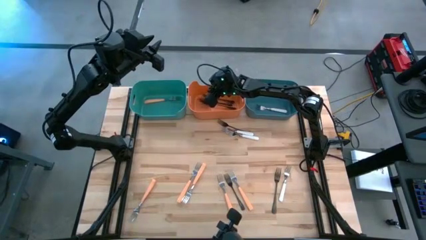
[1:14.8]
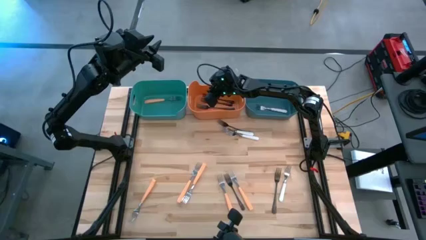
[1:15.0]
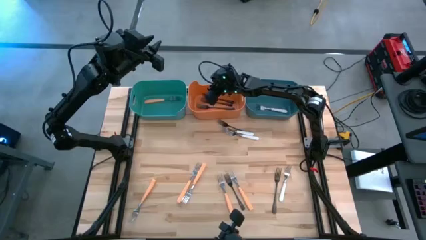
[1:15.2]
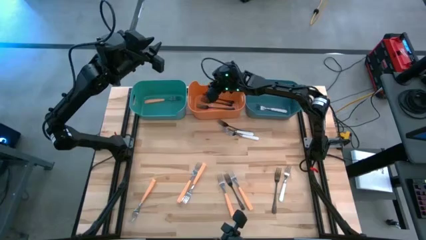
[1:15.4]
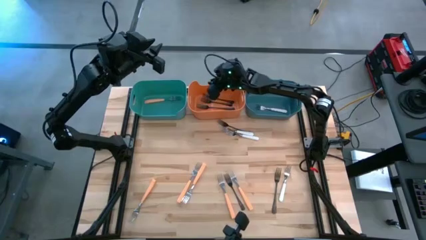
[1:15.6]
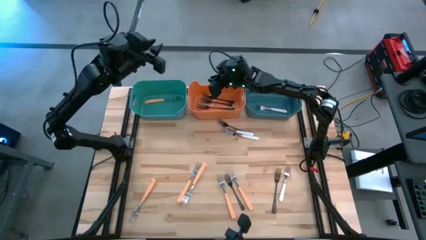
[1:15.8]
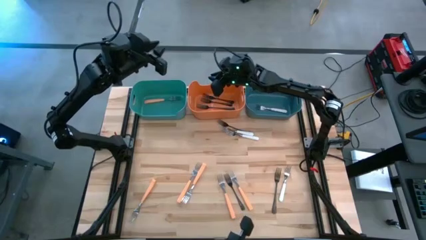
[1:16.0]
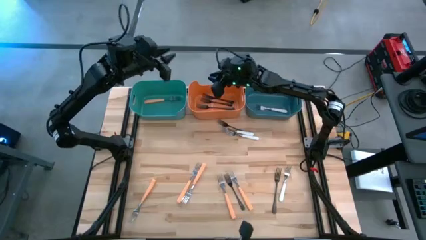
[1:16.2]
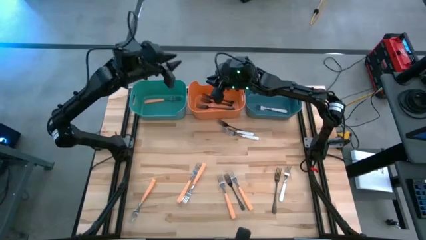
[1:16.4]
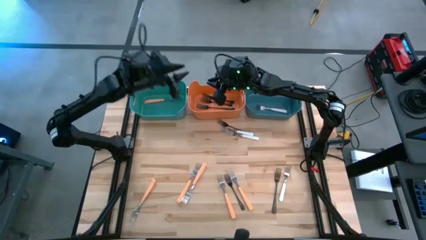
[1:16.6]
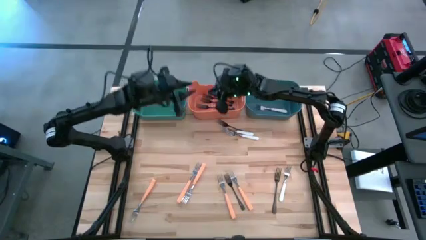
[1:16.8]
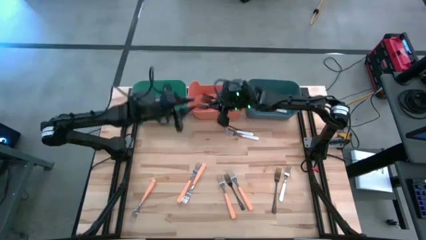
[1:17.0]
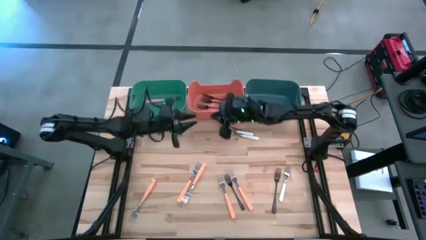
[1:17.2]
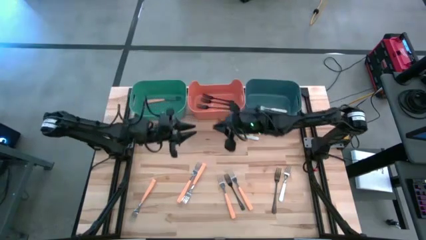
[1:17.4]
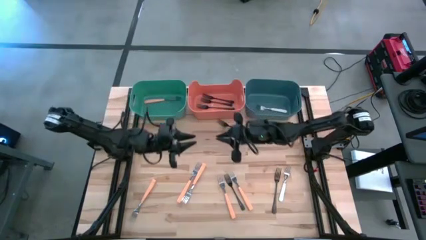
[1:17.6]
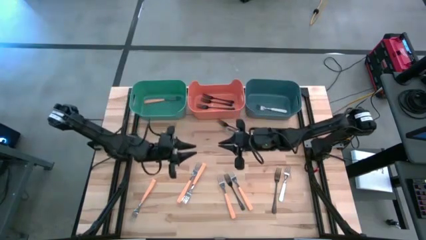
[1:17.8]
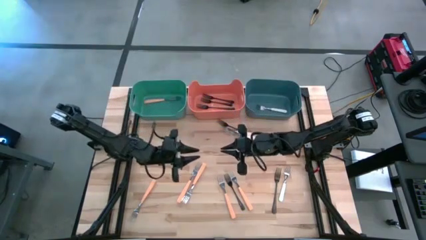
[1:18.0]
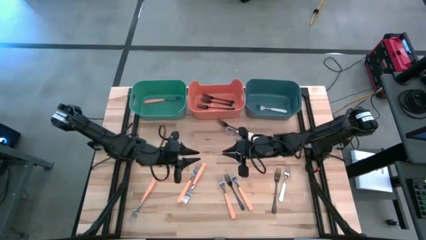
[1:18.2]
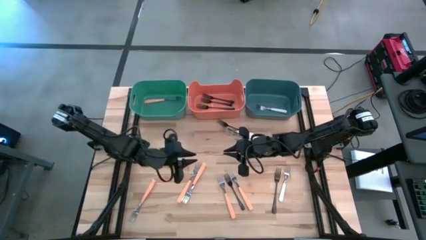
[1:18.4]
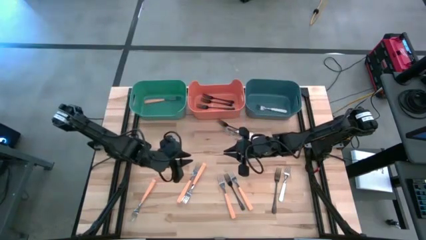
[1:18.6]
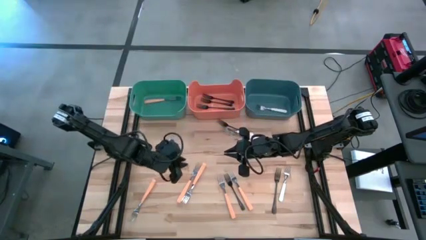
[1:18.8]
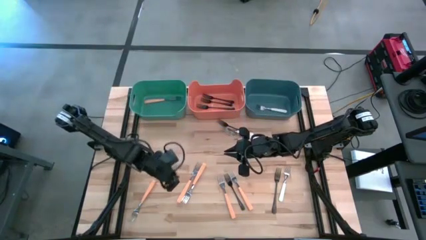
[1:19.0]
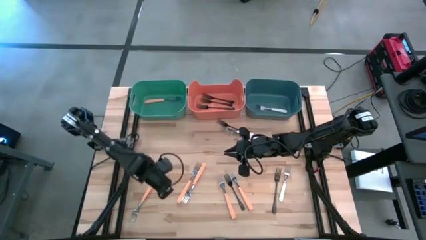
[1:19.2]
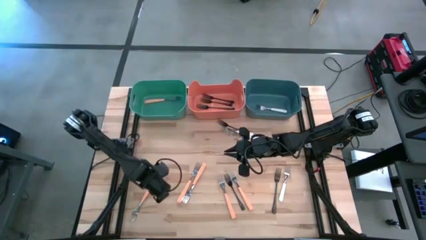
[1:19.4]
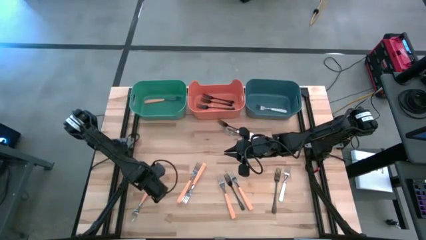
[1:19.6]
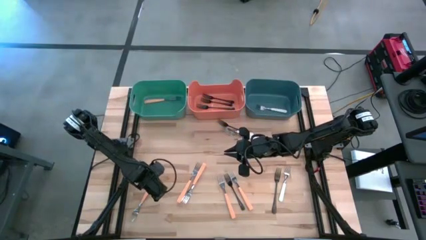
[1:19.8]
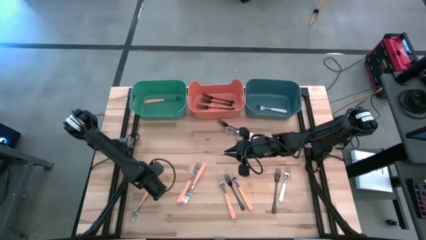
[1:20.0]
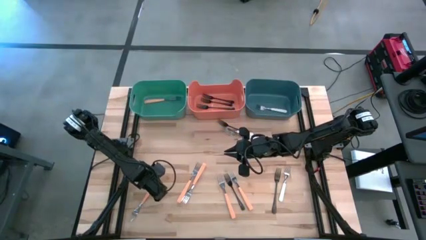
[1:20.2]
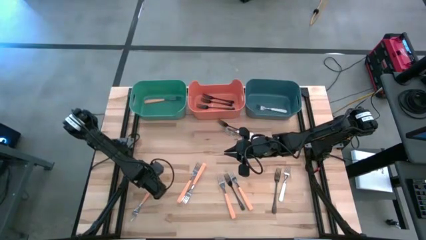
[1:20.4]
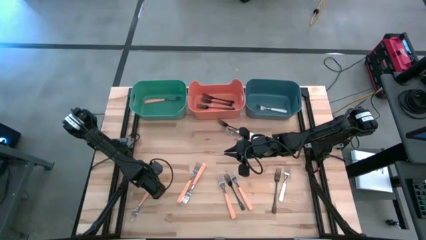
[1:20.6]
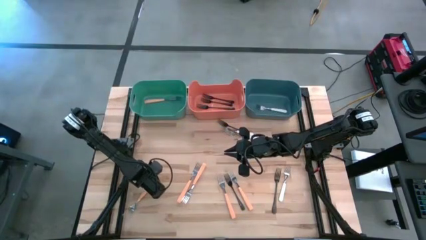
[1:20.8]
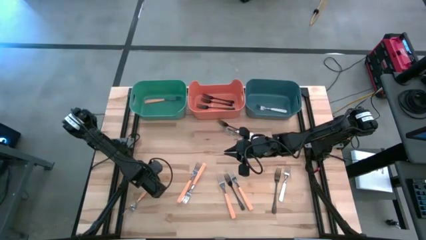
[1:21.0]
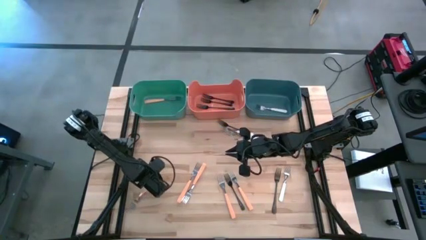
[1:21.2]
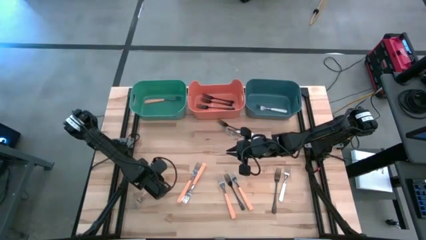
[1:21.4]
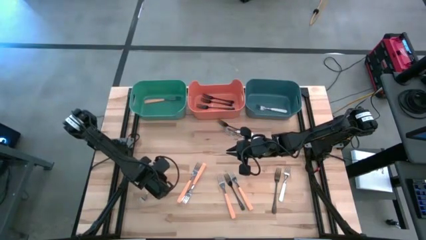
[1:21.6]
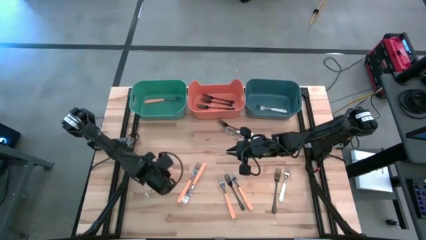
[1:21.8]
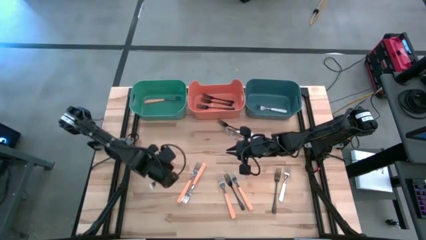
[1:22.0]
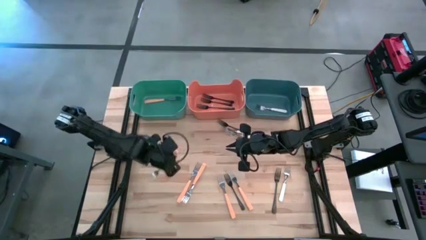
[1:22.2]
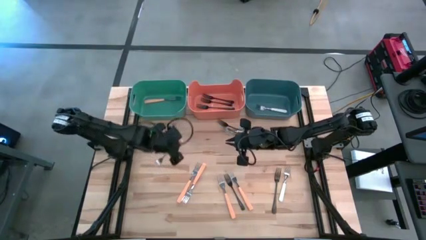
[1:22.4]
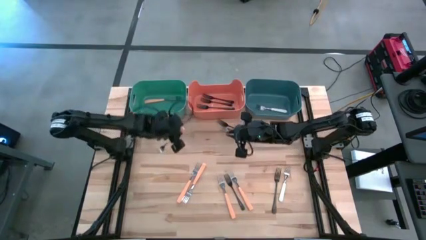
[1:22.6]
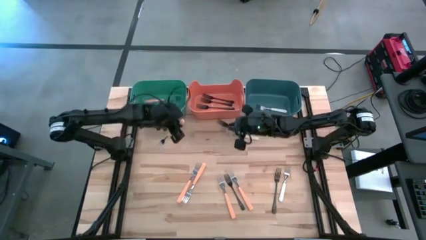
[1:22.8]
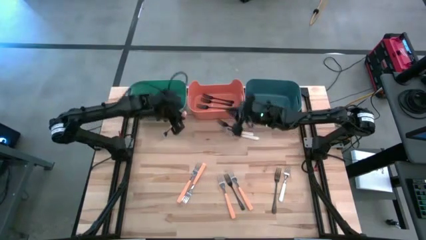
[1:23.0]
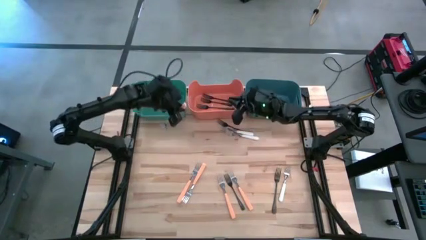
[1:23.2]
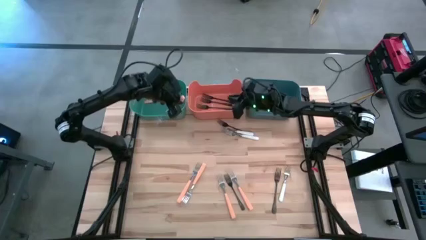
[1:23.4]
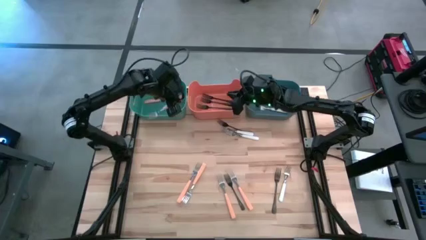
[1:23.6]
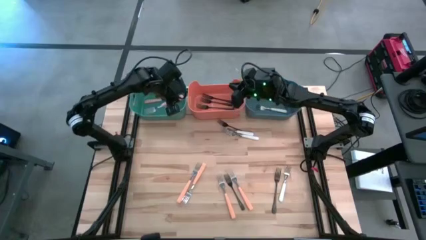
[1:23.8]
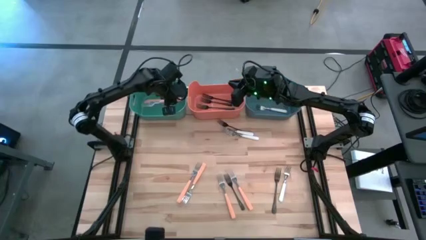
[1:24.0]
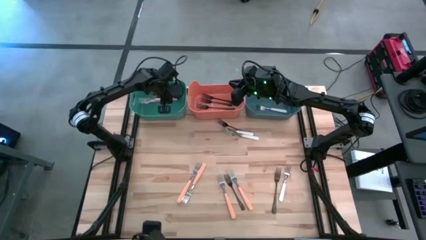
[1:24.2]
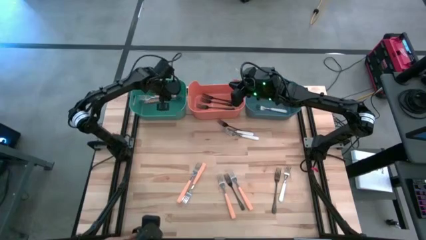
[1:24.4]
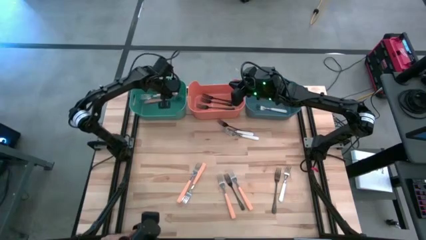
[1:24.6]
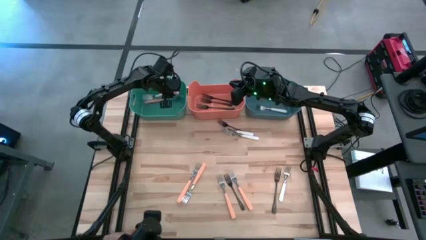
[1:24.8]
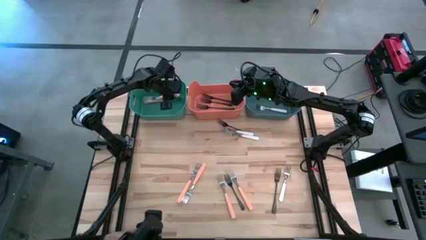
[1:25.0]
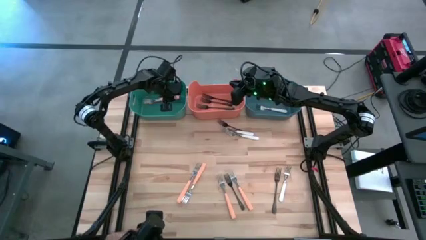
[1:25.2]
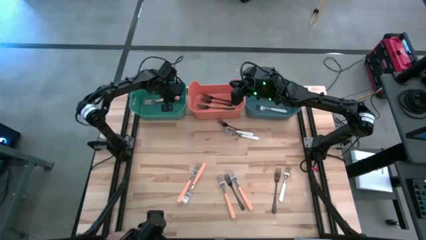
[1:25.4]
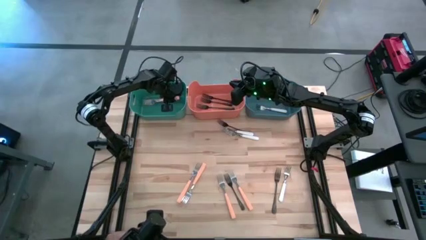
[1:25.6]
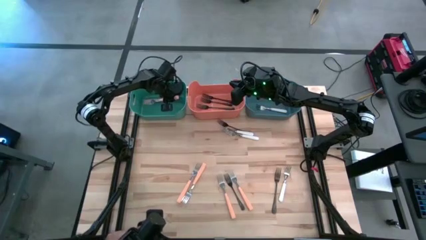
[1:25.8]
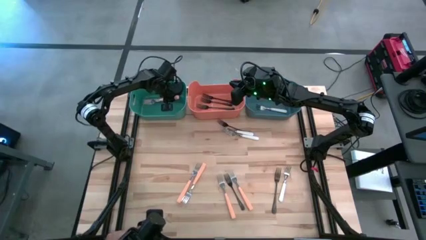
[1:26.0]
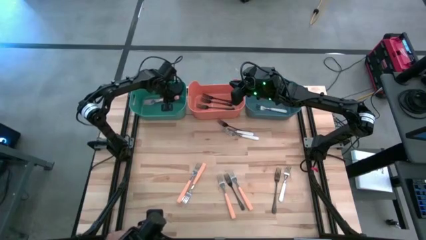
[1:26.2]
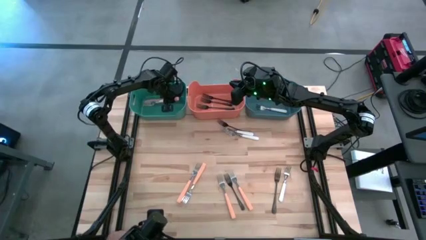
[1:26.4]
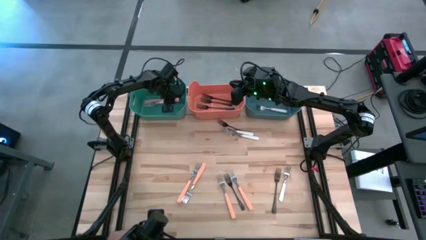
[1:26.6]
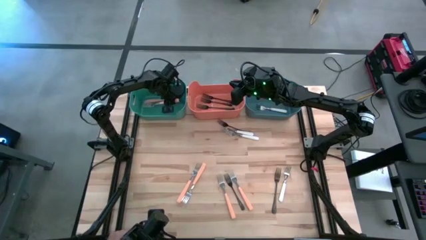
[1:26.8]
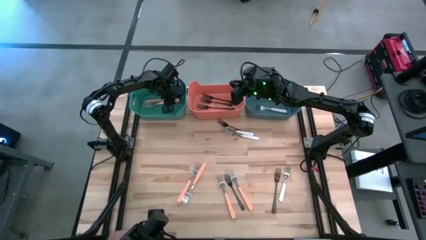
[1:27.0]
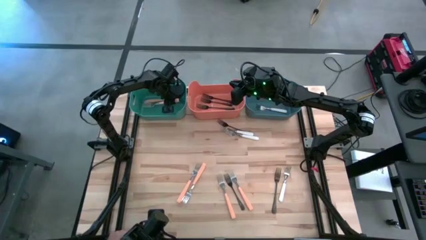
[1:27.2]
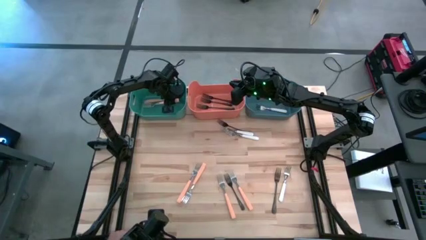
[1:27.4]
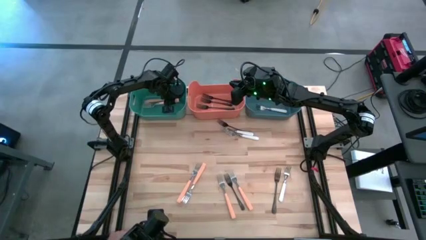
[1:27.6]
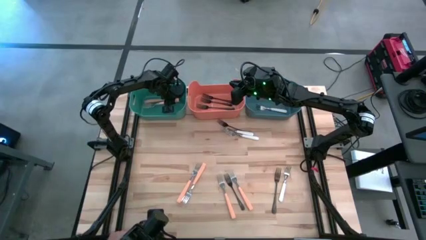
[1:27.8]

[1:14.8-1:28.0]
Task: Sort silverware by color (type)
Put the orange fork into the green bin

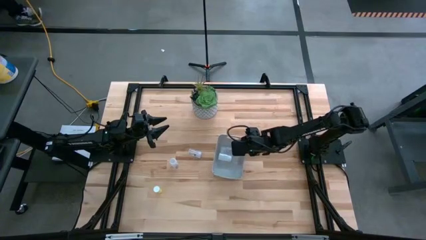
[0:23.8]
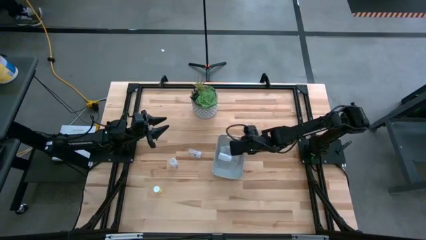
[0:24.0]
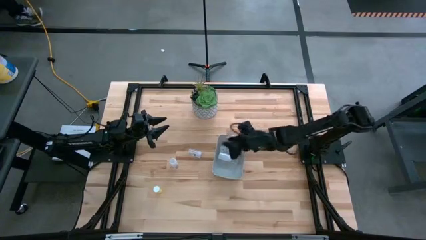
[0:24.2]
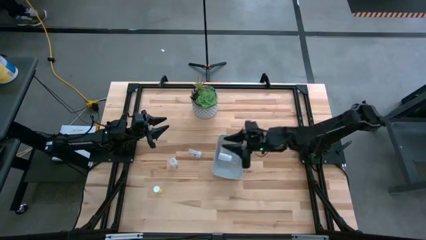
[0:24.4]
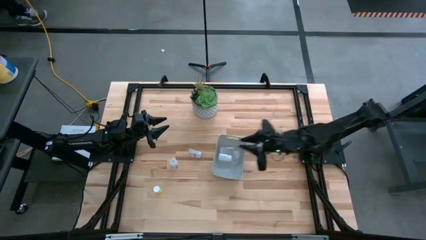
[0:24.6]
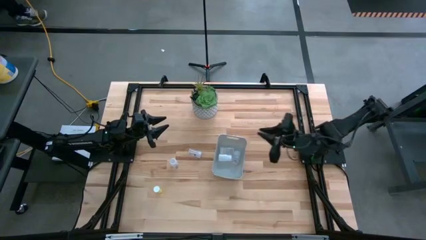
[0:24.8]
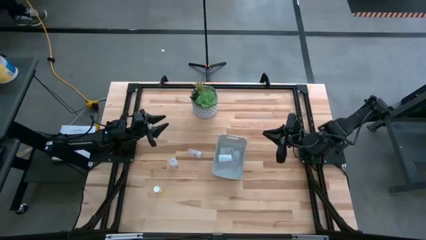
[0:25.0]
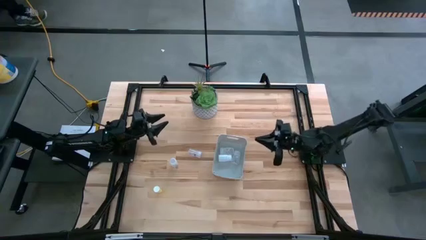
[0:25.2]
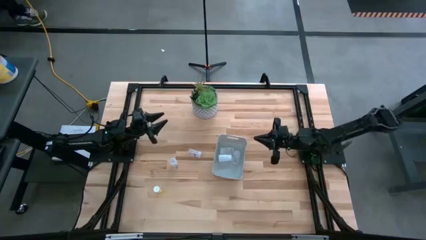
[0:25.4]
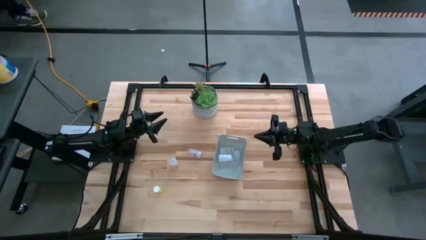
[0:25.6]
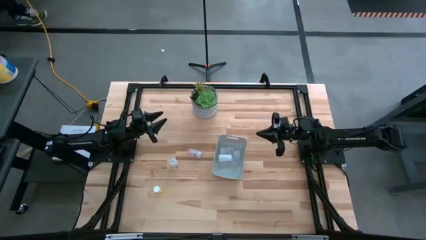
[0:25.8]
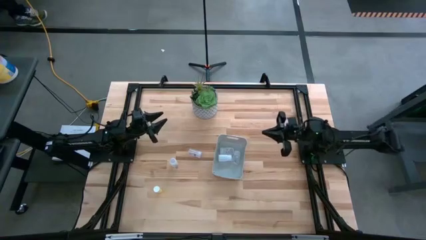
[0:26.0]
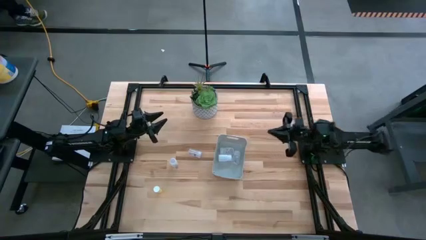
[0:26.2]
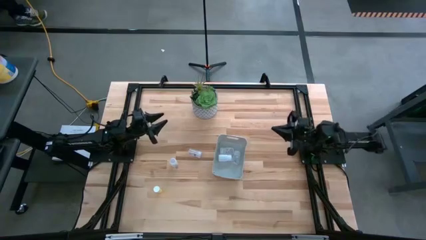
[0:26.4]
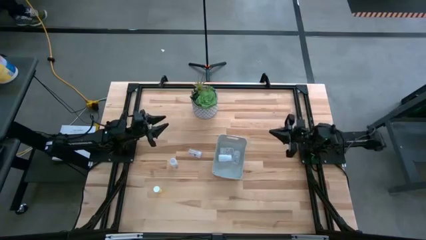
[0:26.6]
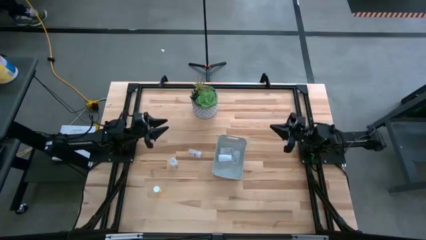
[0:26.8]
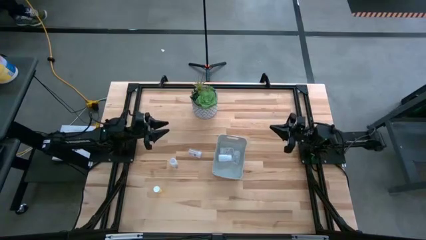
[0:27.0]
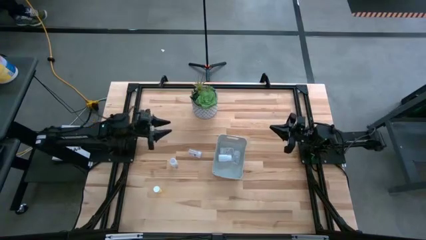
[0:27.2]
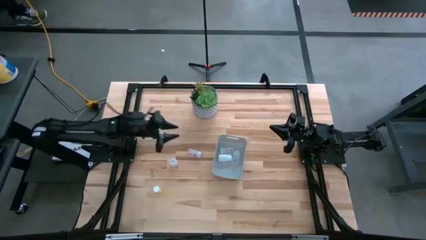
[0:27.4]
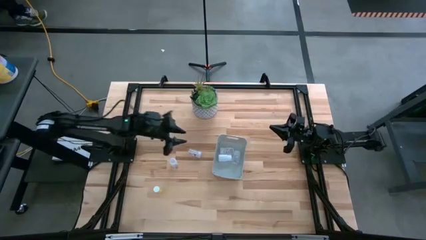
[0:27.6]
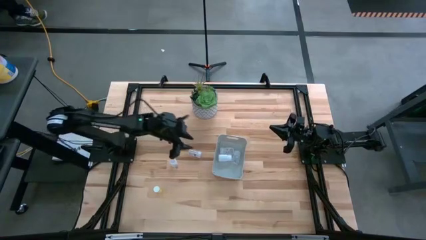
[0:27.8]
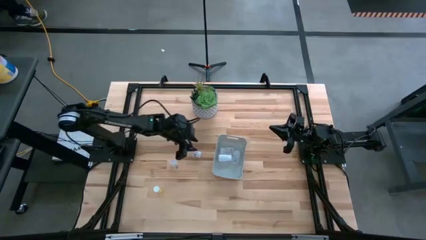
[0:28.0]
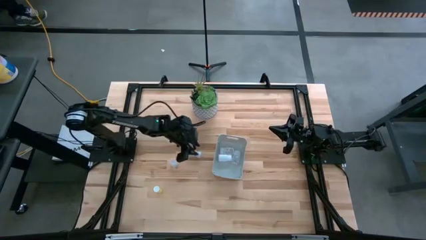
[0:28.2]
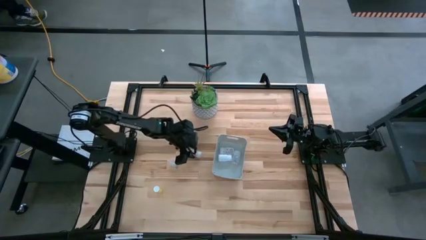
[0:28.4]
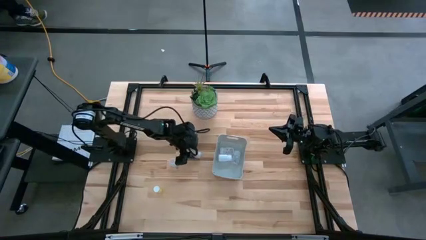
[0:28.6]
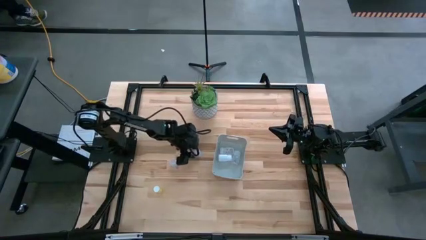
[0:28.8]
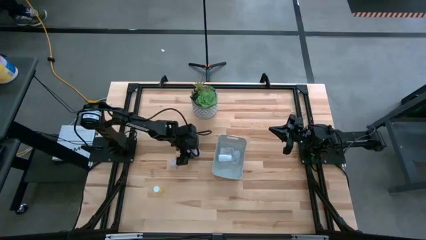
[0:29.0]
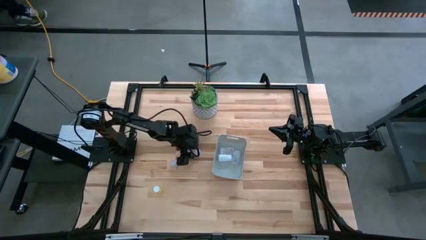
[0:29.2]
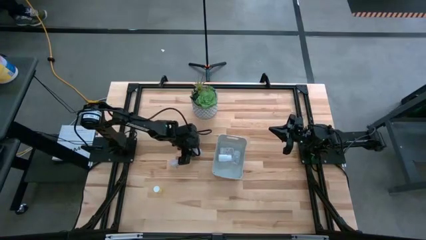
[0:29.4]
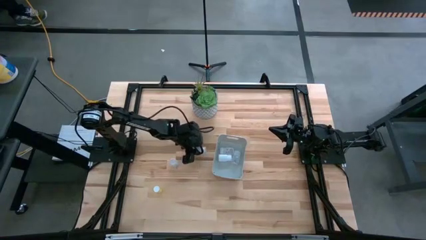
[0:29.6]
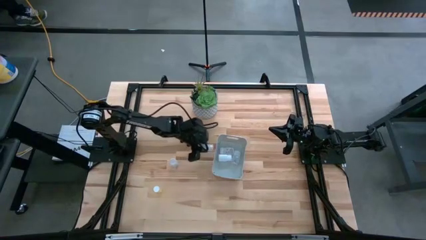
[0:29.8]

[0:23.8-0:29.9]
Task: Pick and place pill bottles into a basket
Put the top transparent medicine bottle into the white bin
